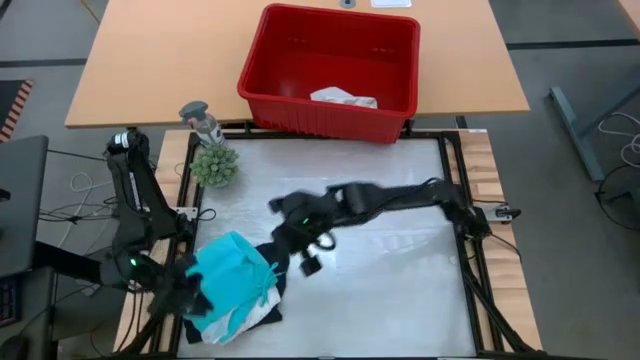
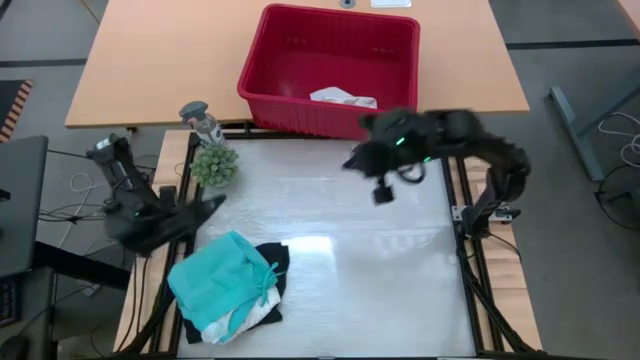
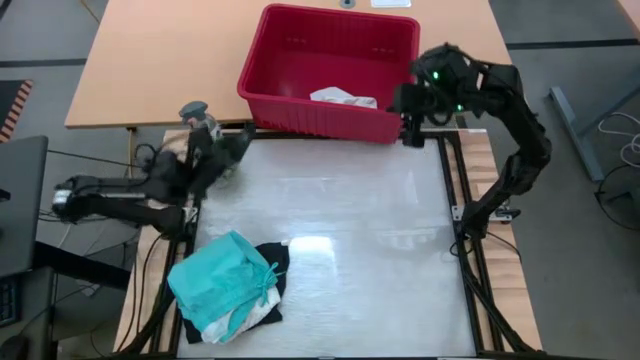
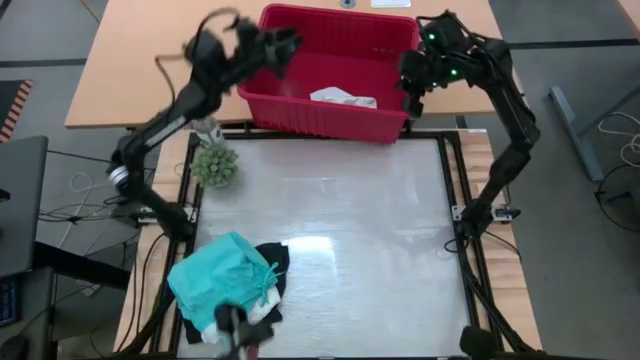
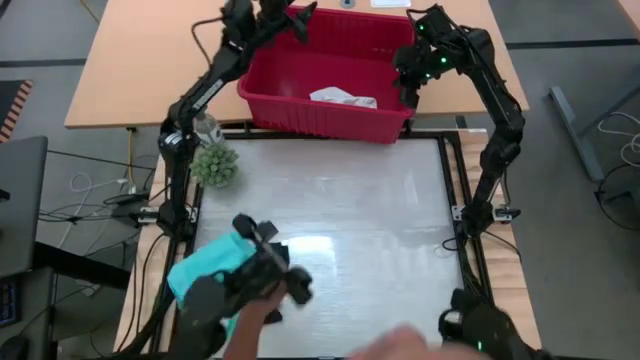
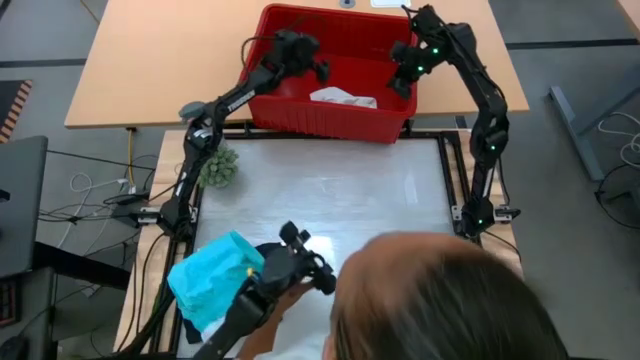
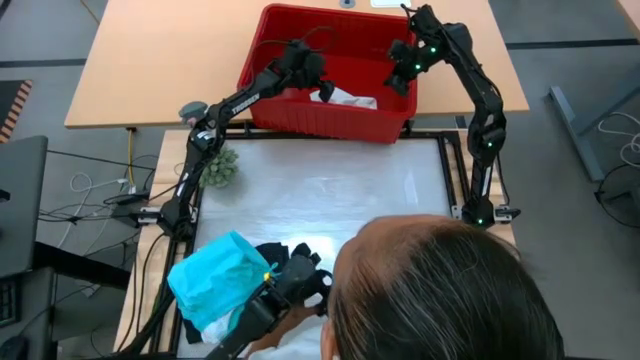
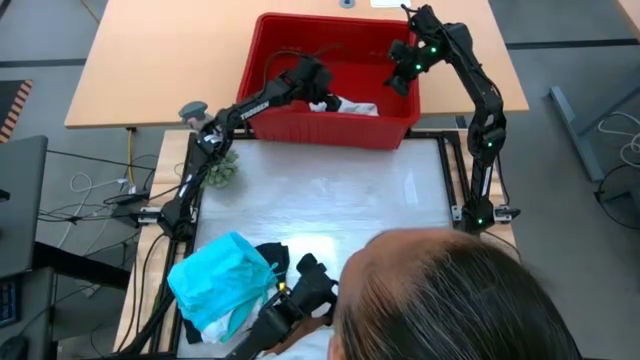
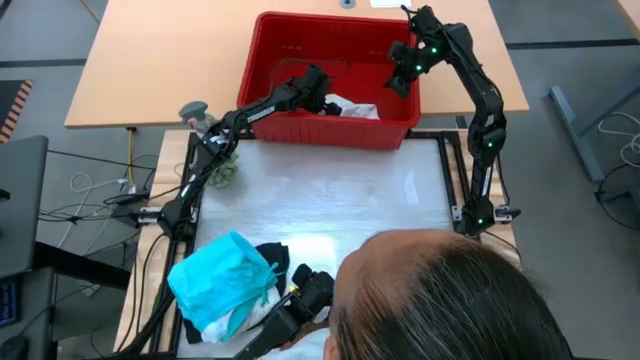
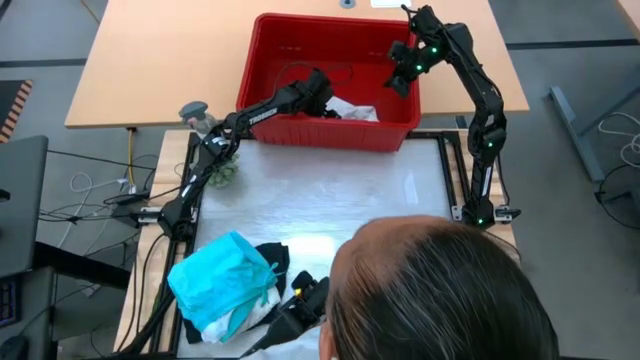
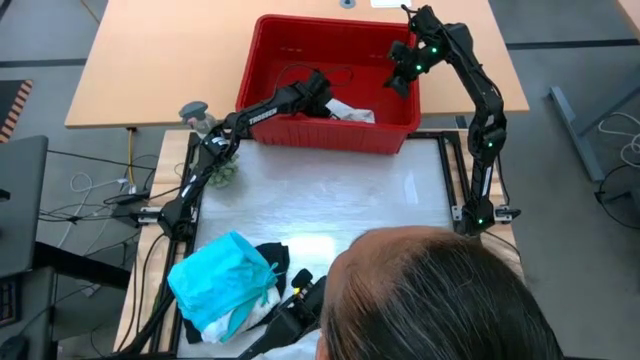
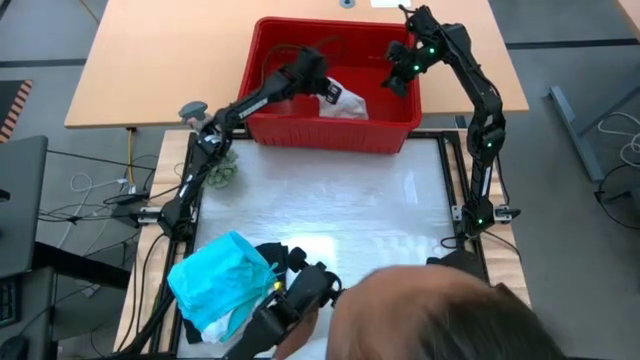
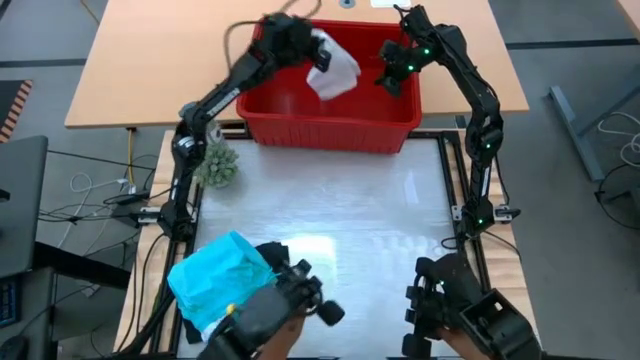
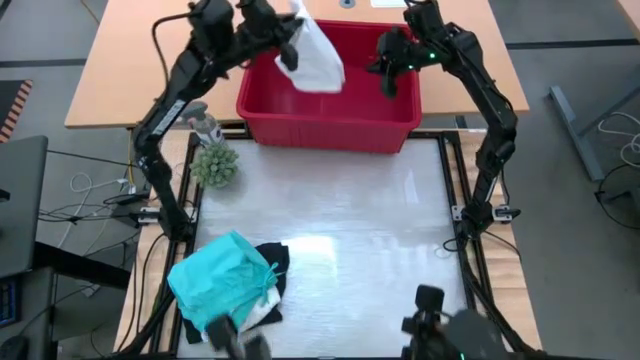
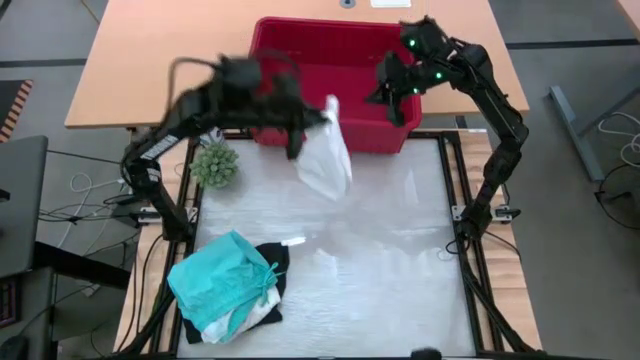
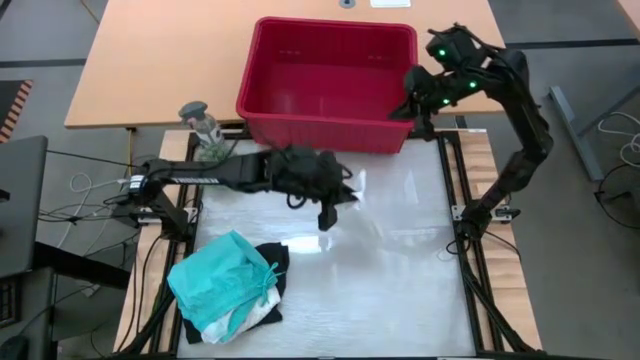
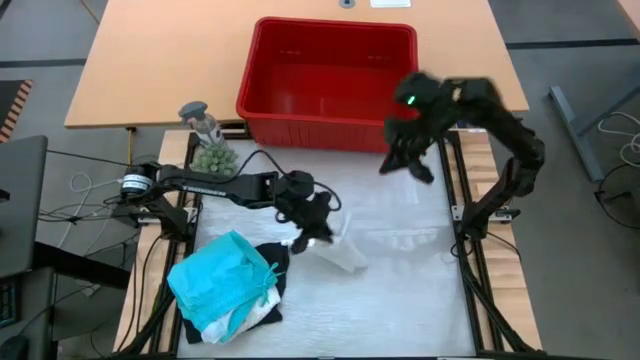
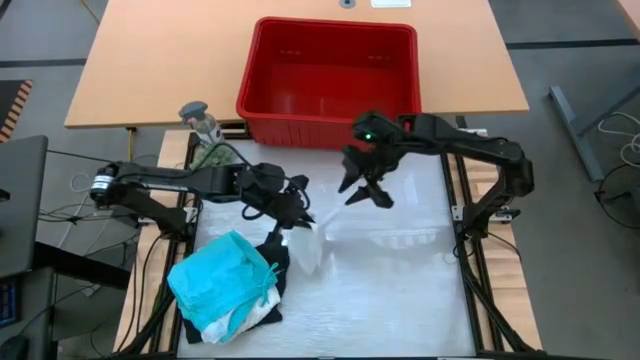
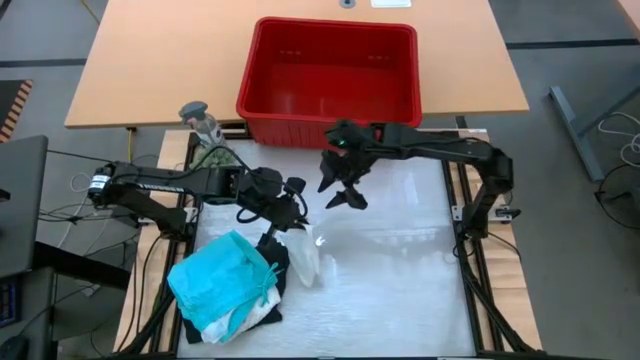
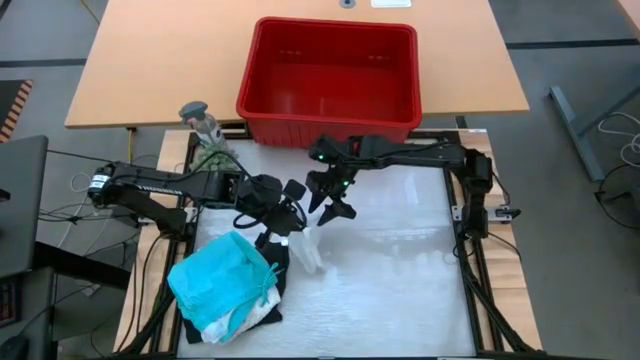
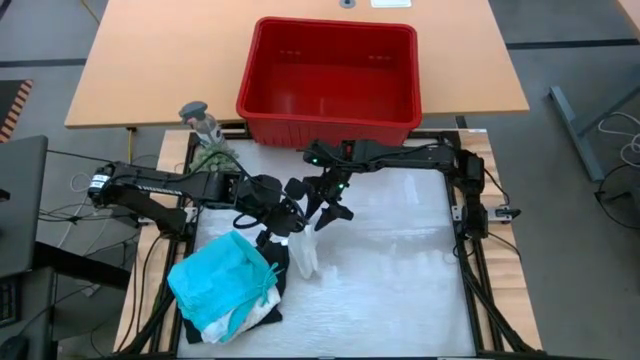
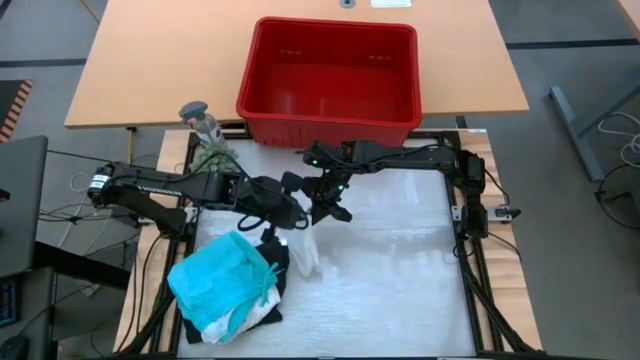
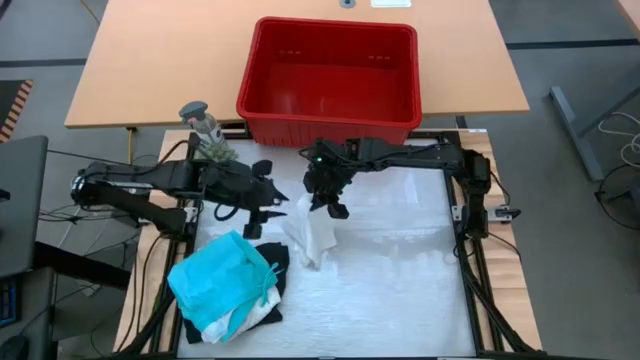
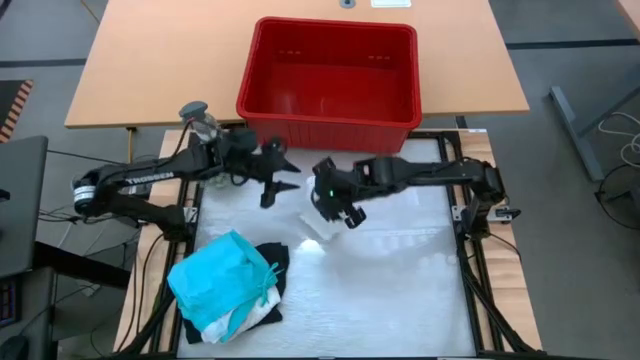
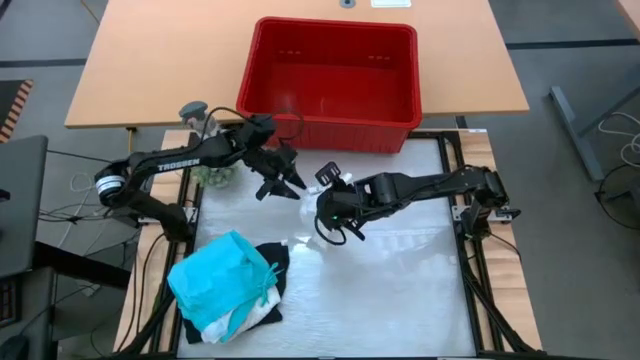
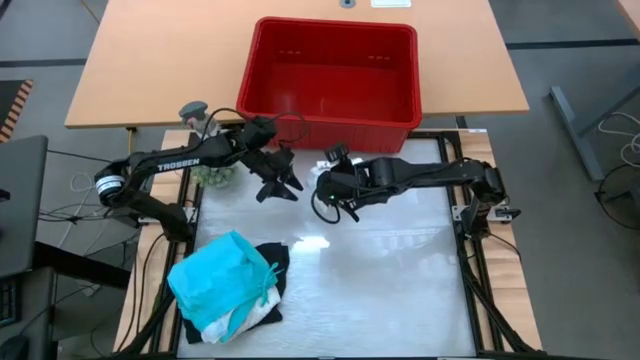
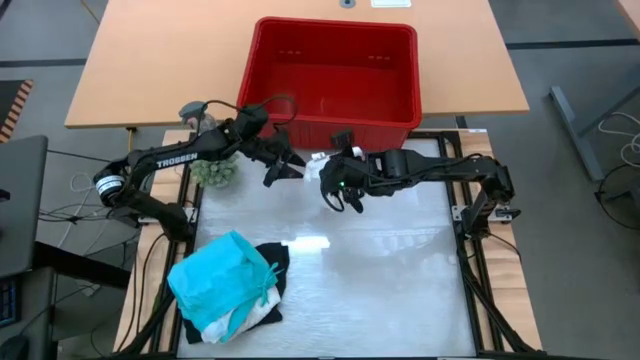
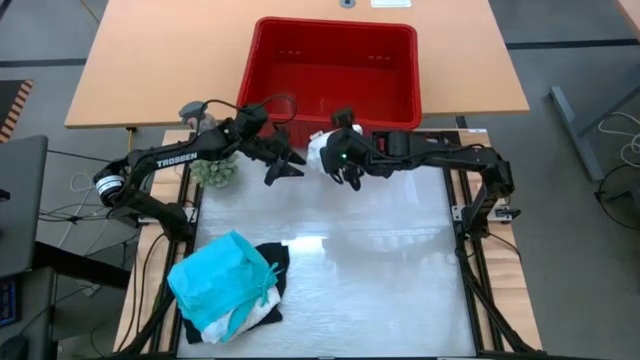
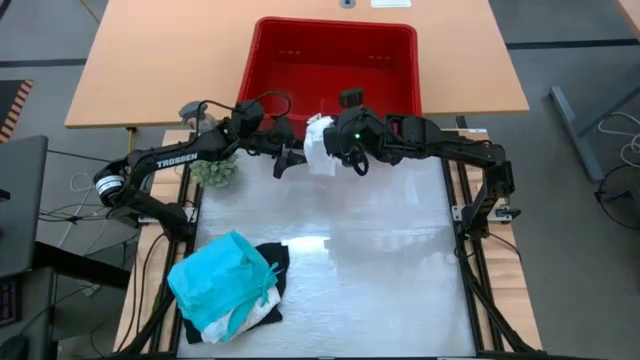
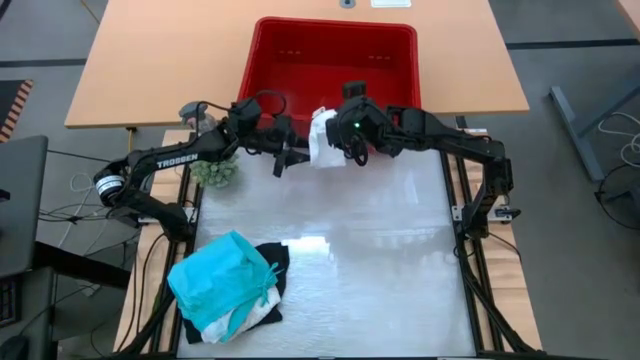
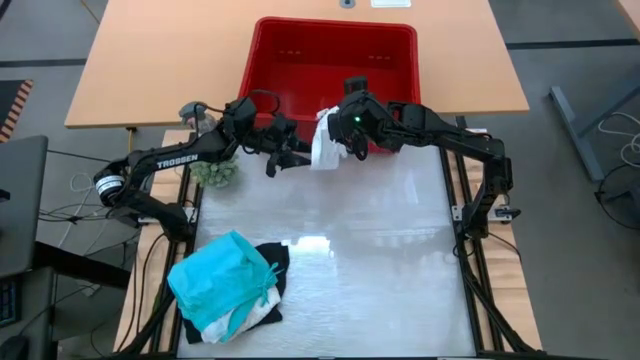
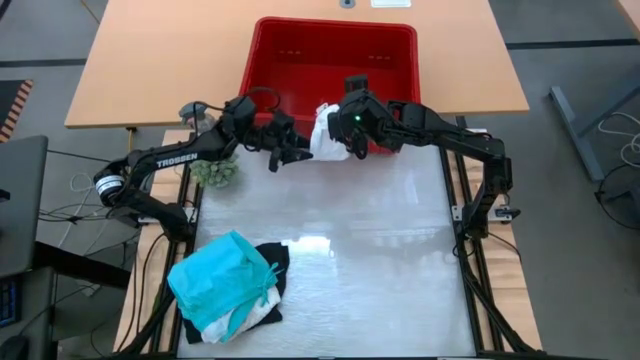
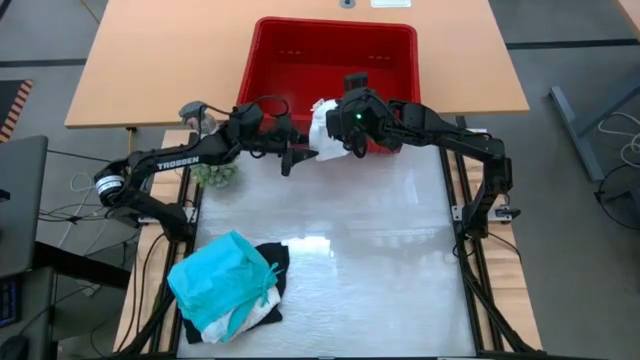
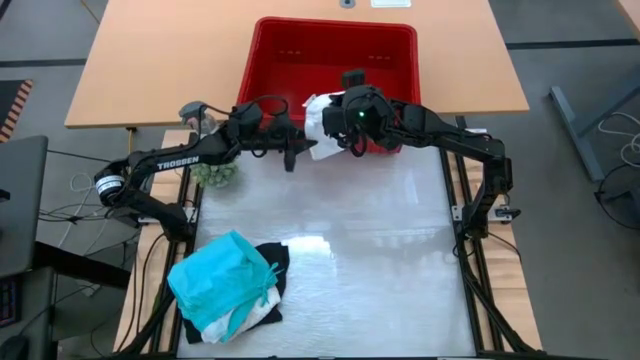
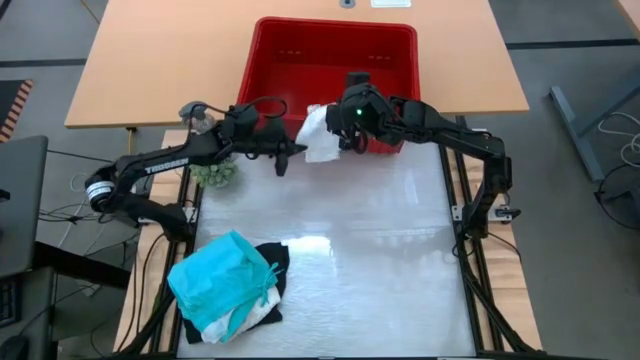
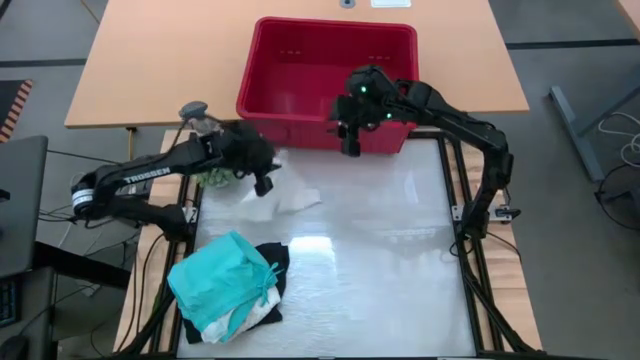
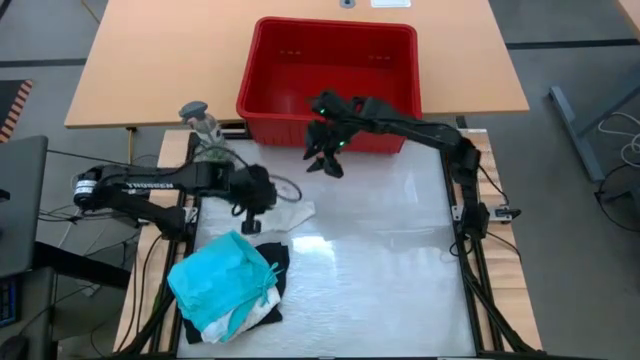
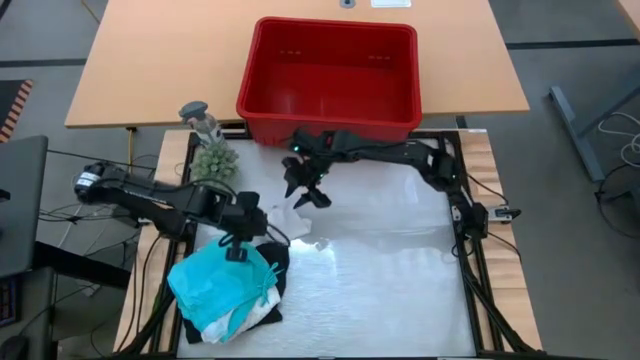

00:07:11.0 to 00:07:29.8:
Task: Fold Laundry from Bin
Fold the white shorts
